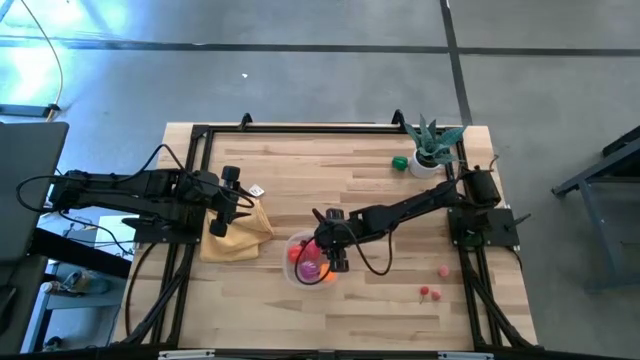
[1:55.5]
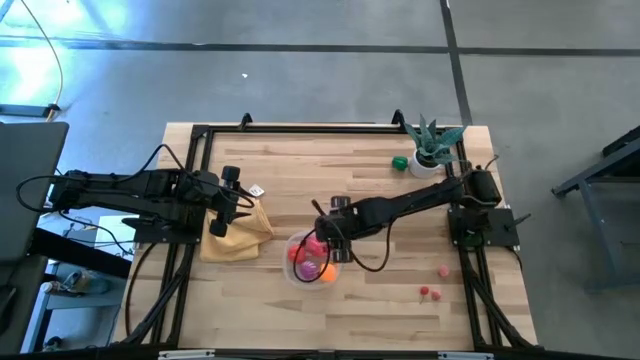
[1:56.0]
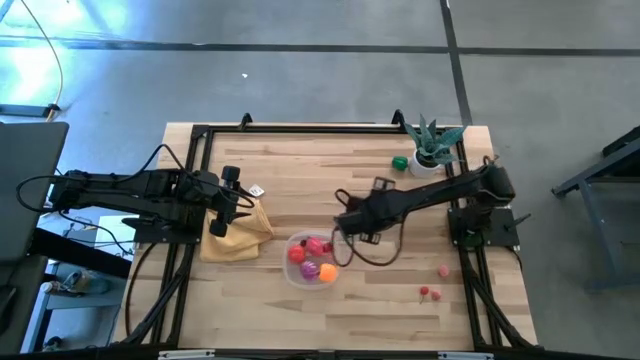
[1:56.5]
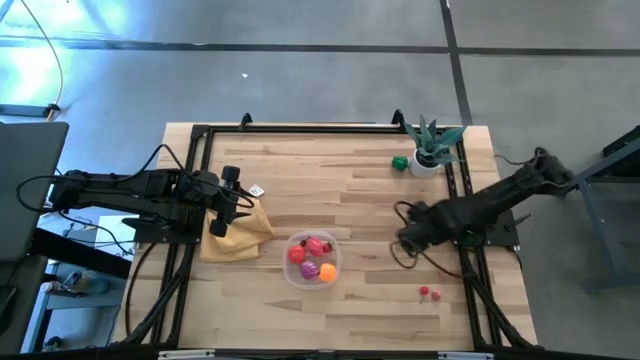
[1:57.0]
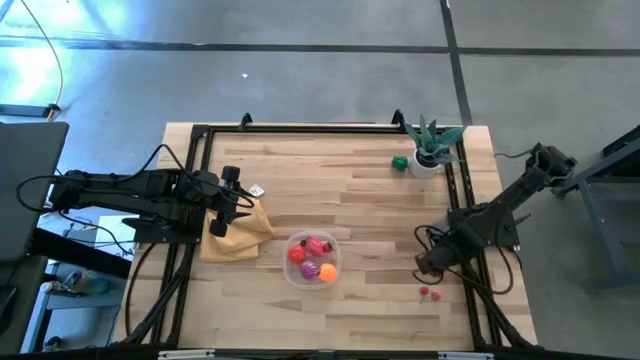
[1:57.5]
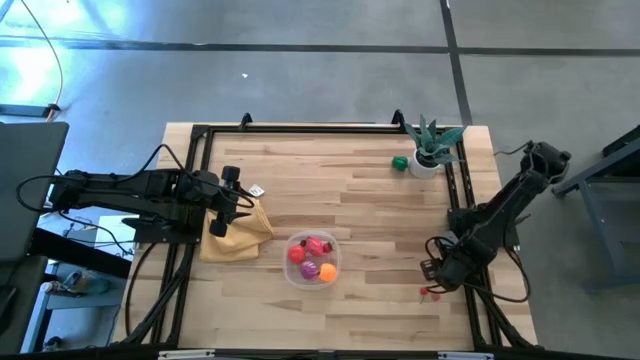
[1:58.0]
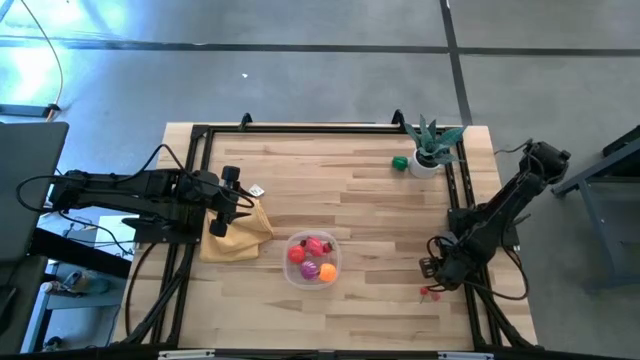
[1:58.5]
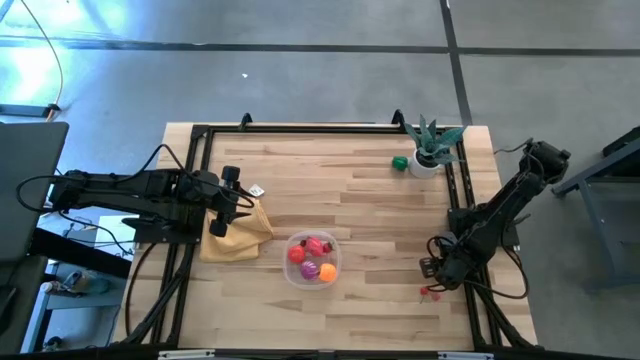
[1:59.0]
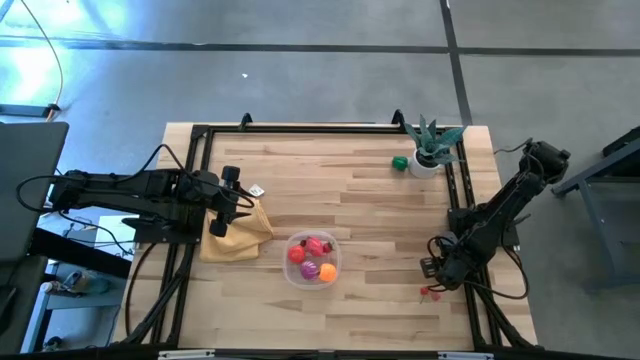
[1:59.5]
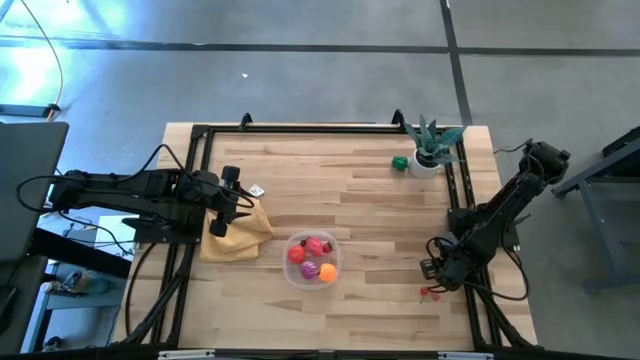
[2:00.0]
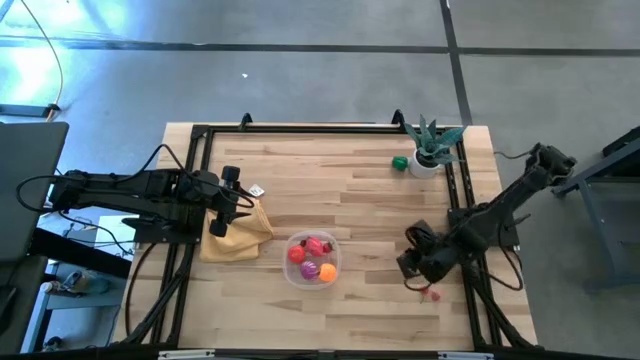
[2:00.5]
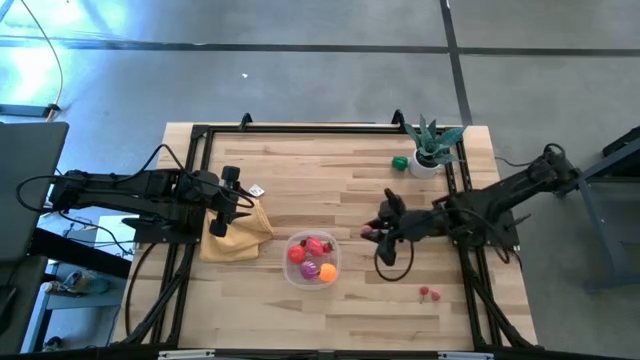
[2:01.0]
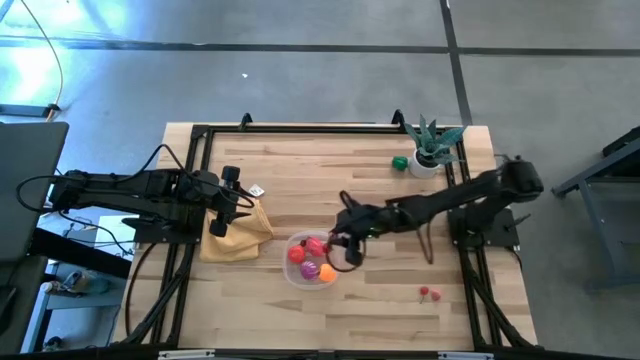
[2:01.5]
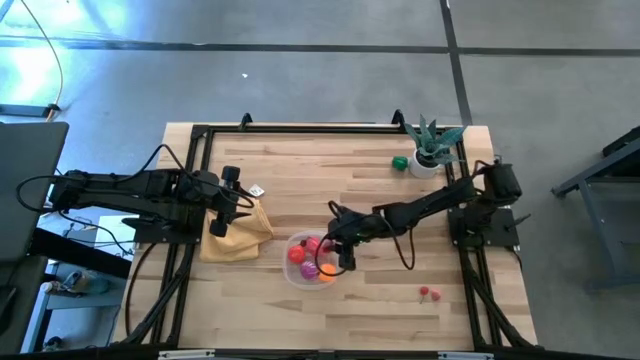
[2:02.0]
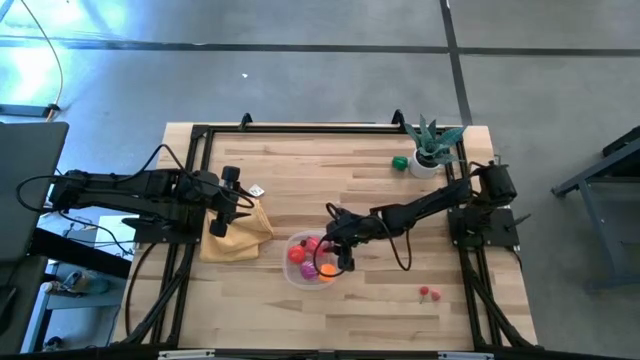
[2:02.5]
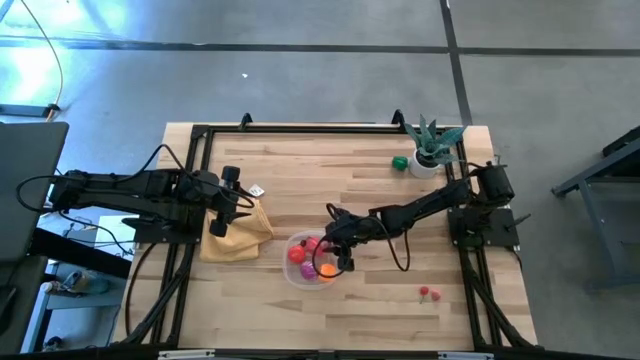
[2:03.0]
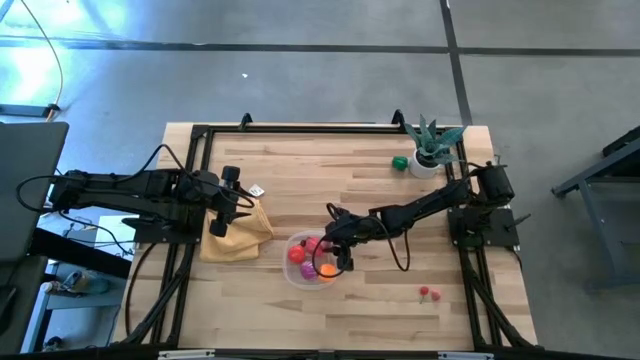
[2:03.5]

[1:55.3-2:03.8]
Task: Pick and placing Produce into tupperware
Put the top pink peach into the transparent bin

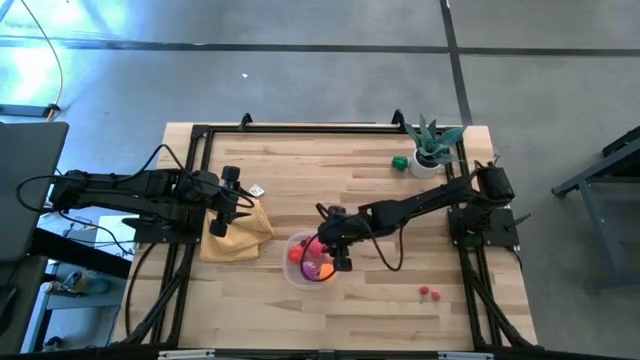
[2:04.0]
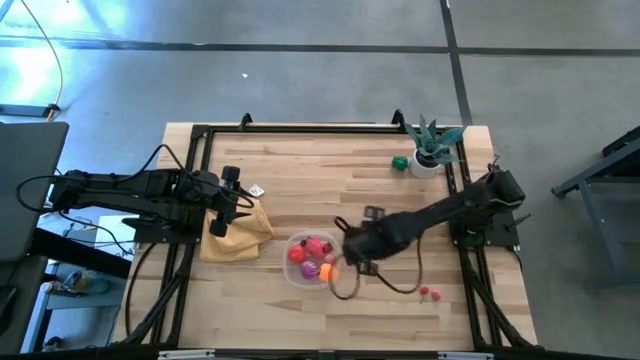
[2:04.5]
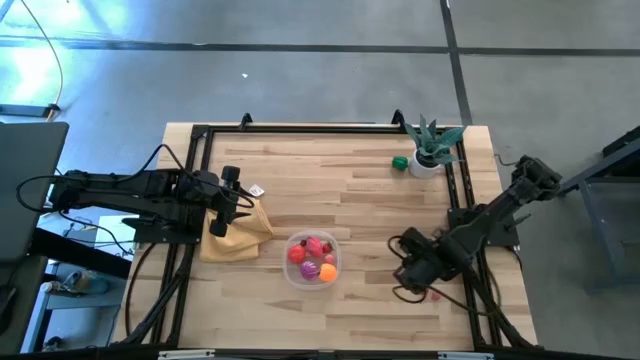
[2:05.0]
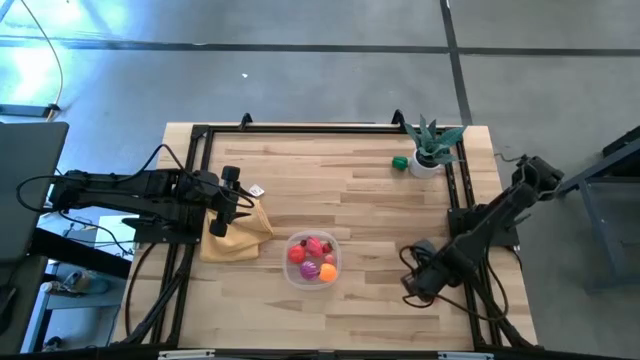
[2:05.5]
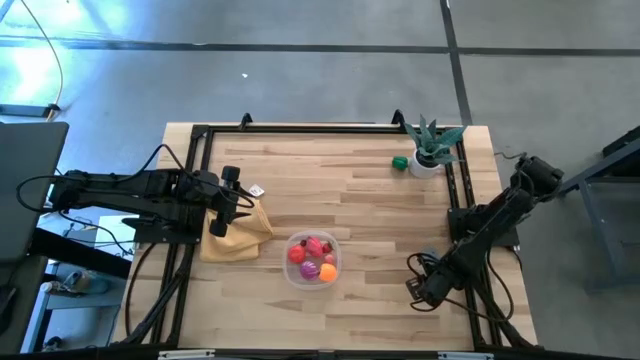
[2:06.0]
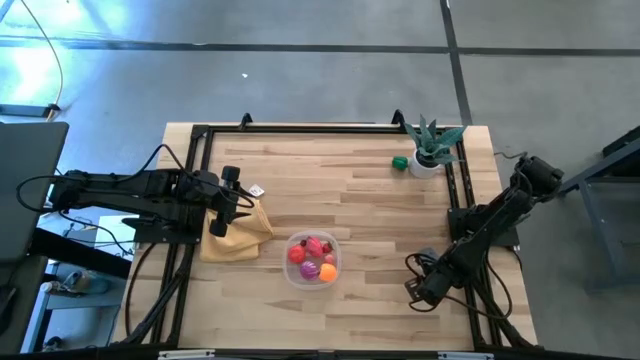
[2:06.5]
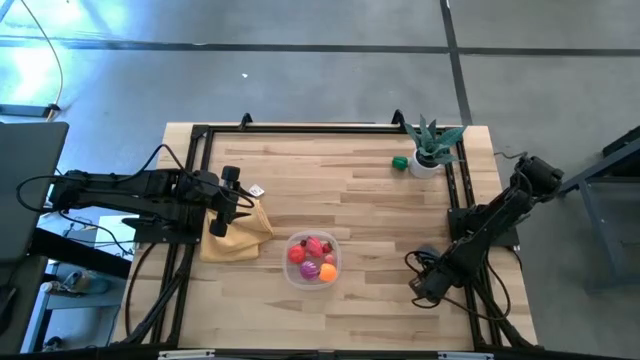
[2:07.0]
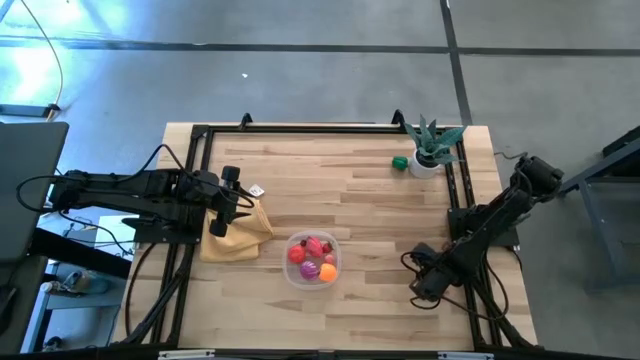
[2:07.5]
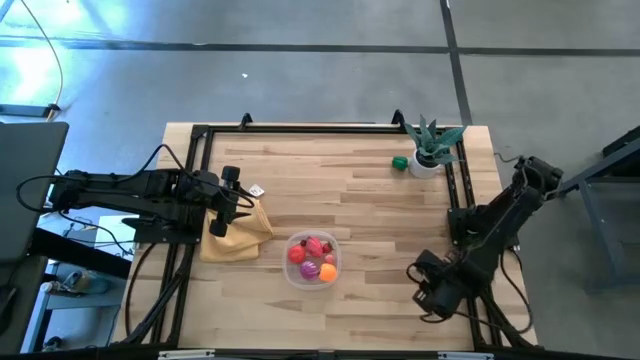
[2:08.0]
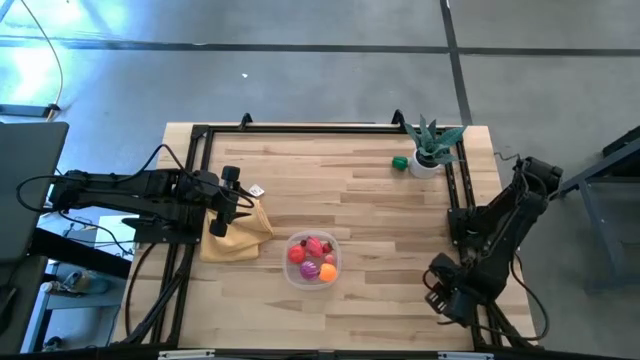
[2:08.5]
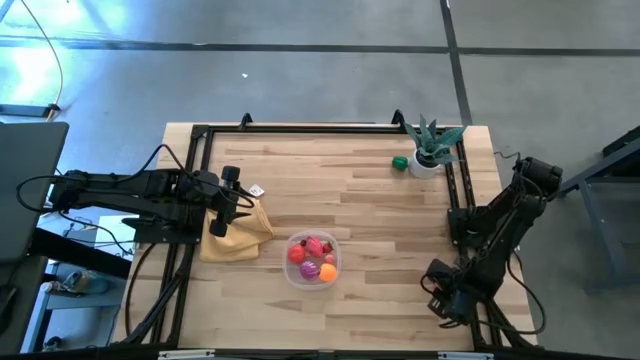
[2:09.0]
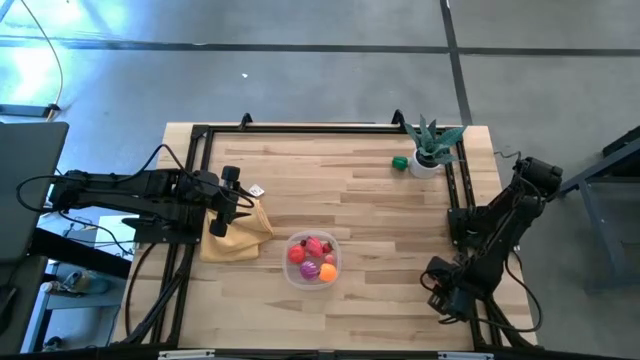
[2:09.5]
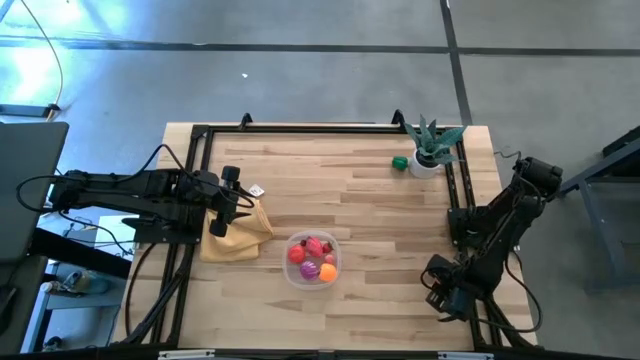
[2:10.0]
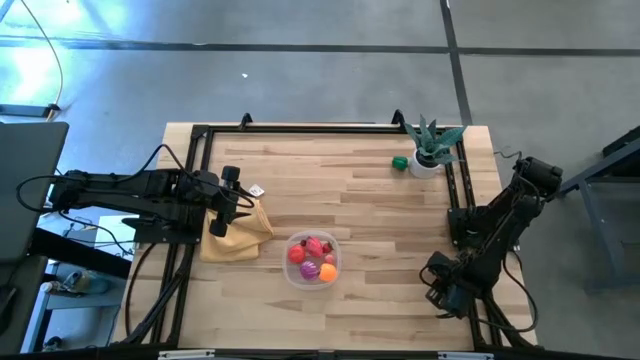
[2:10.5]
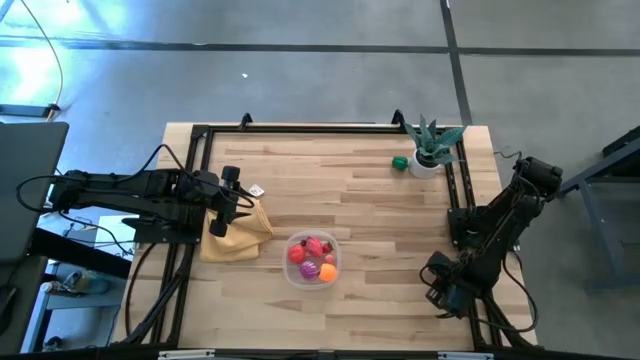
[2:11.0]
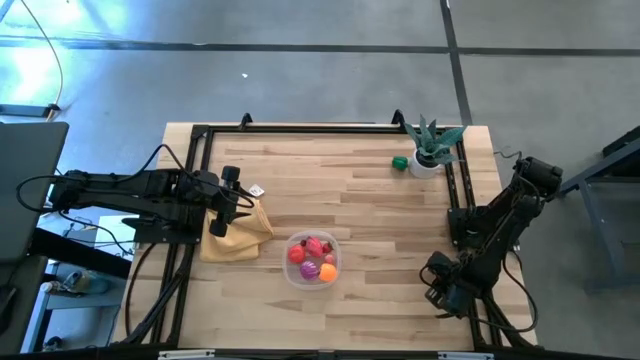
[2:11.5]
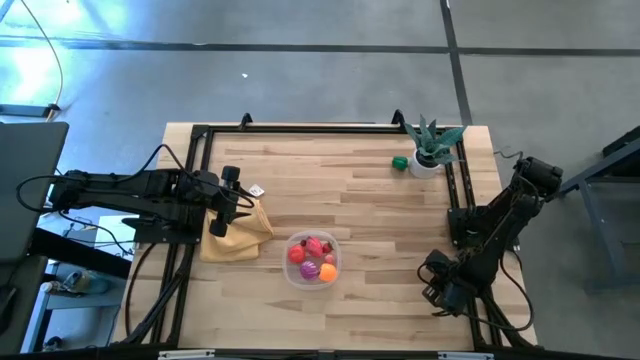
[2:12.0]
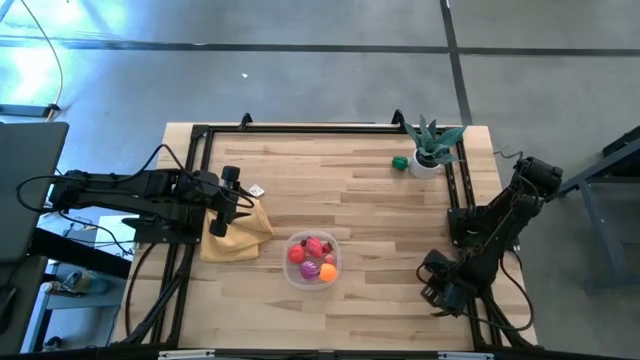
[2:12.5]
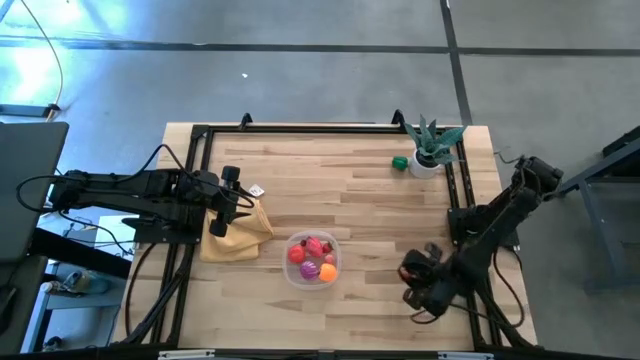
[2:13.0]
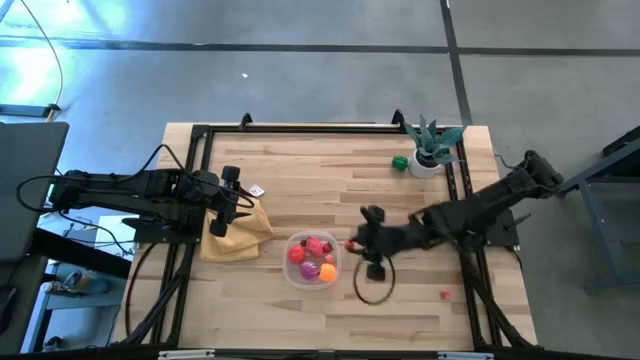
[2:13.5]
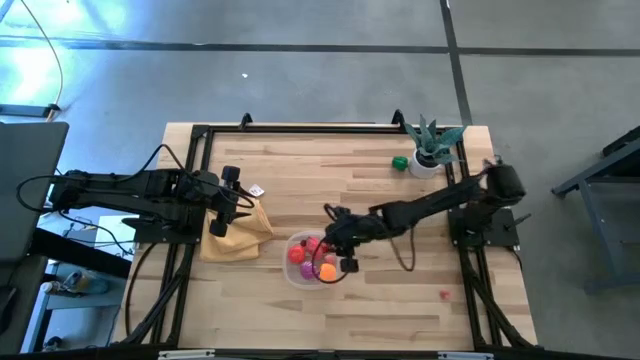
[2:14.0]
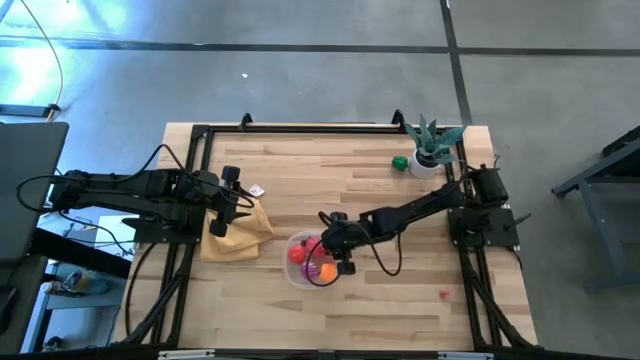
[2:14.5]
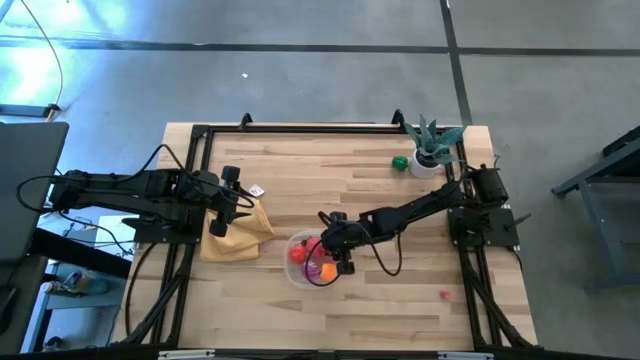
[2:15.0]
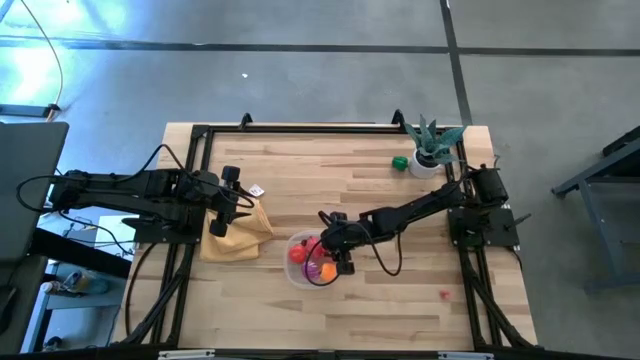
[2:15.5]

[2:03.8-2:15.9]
Put the red cherry into the transparent bin

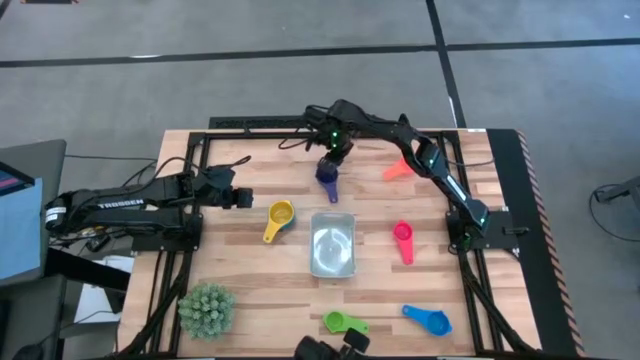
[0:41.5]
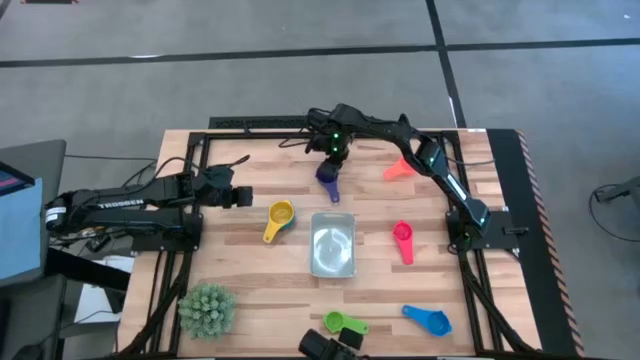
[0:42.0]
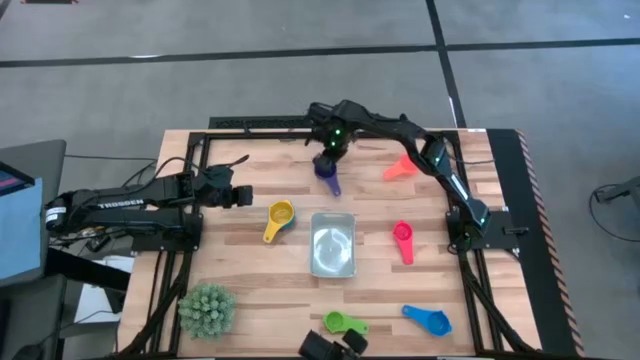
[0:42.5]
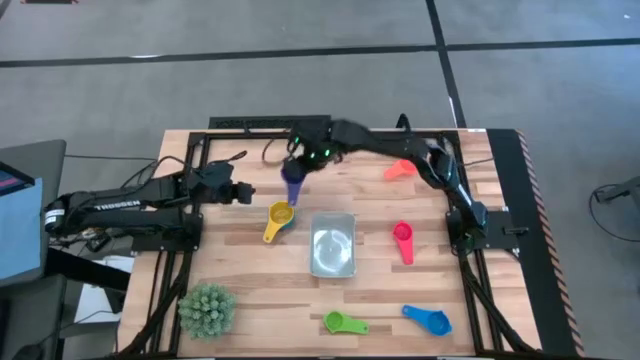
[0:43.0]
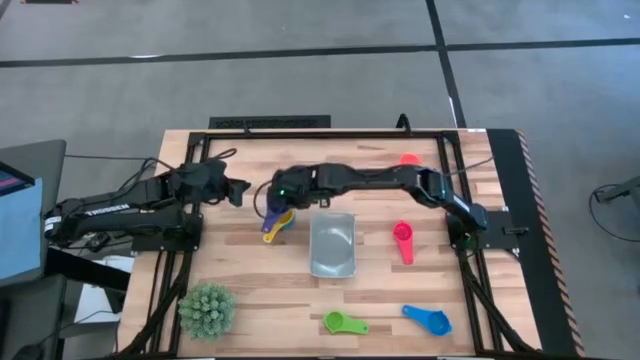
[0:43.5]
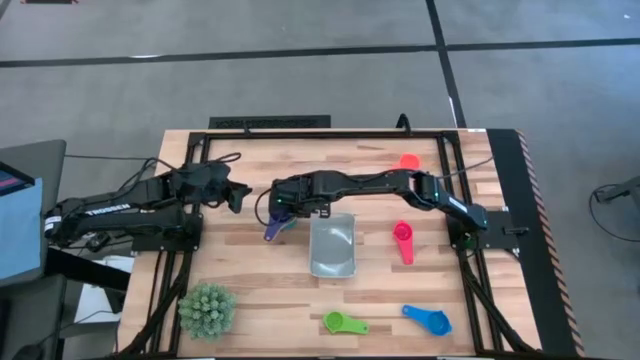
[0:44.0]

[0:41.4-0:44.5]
Task: Nest measuring cups in basket
Stack the dark blue measuring cup on top of the yellow measuring cup
